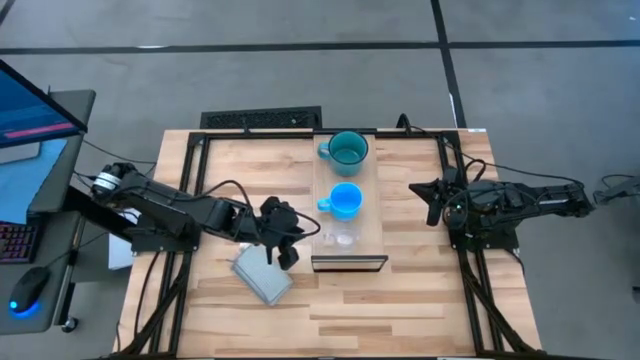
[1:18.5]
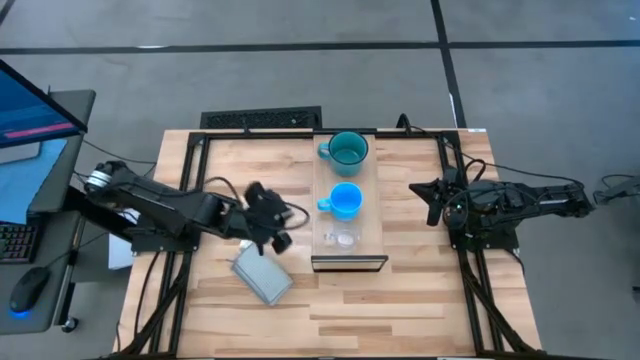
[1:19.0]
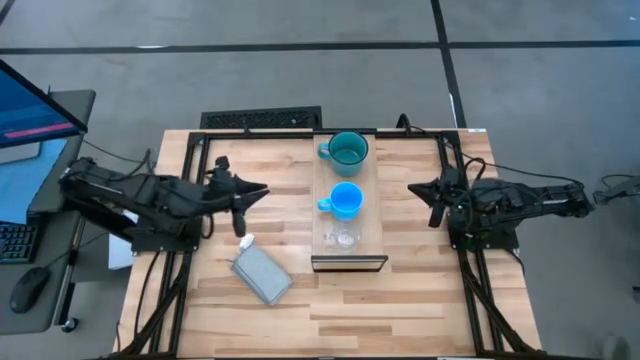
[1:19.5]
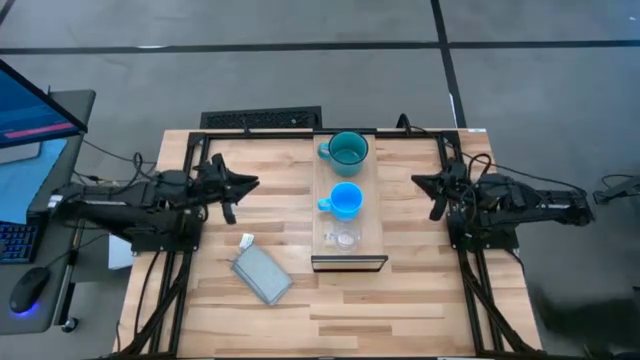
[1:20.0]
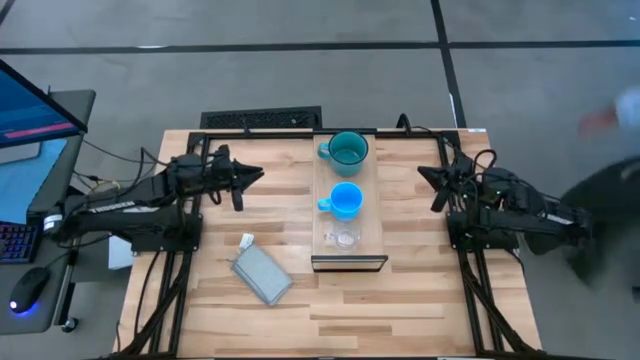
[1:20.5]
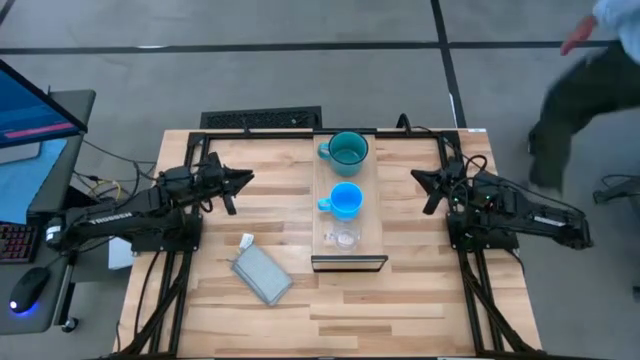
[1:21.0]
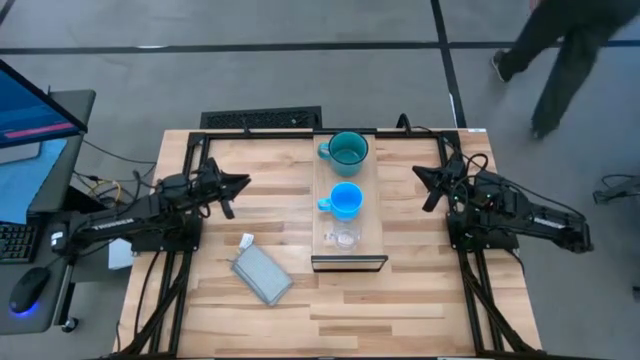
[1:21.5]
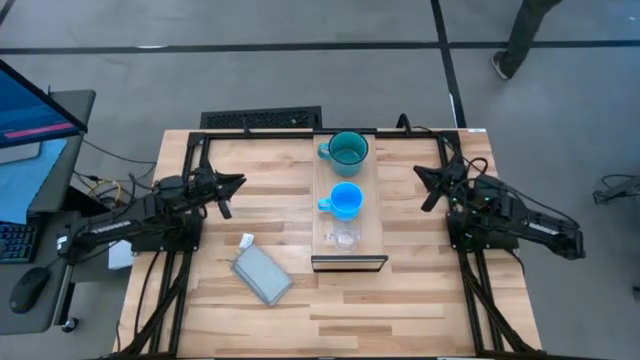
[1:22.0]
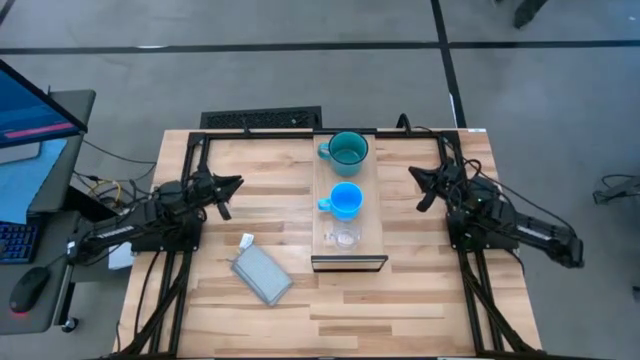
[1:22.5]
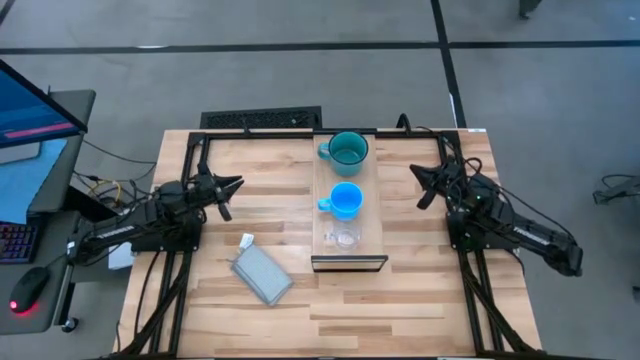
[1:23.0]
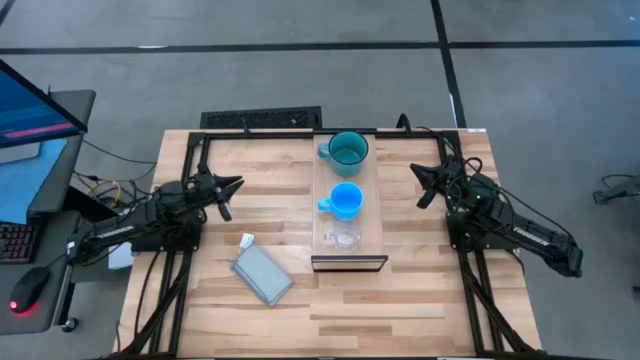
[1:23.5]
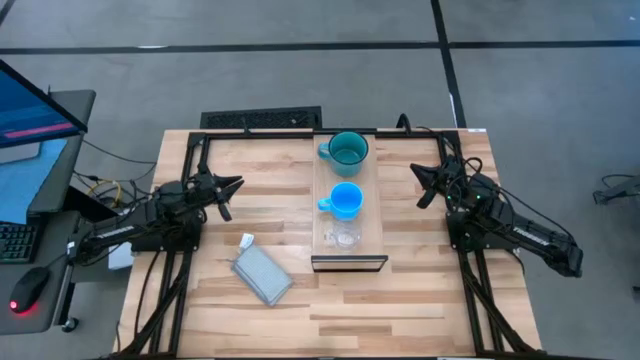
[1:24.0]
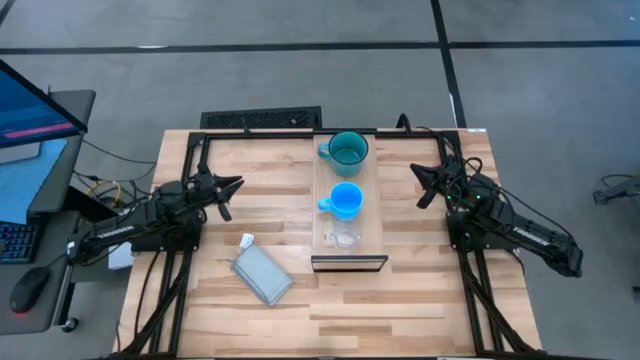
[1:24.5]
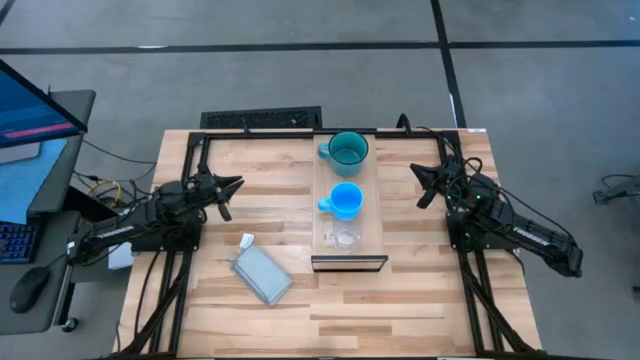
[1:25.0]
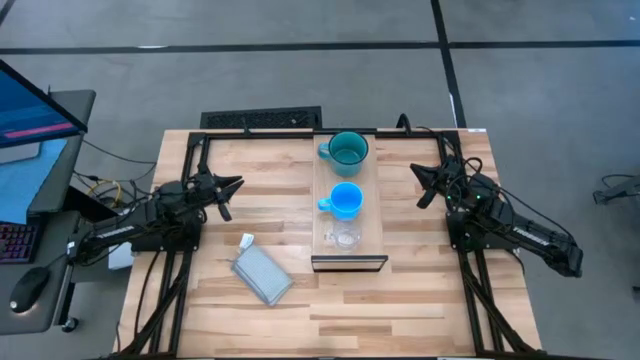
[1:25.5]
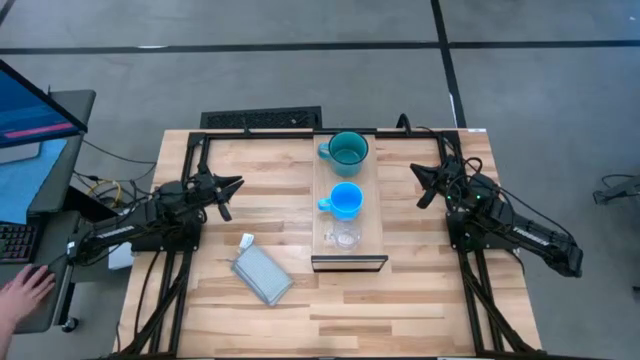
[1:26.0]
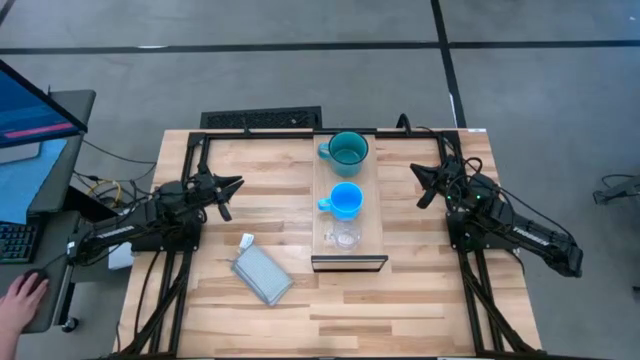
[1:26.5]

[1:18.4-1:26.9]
Task: Stack small to large cups/mugs on shelf
Return to Home Position

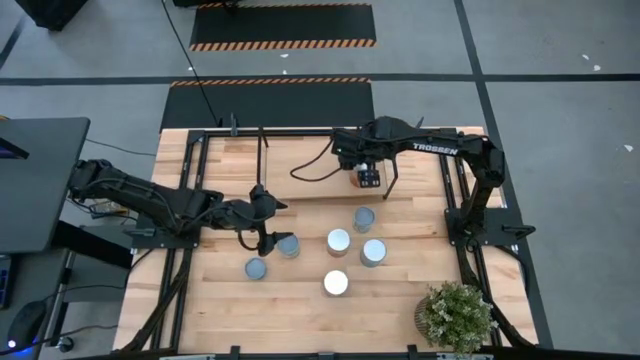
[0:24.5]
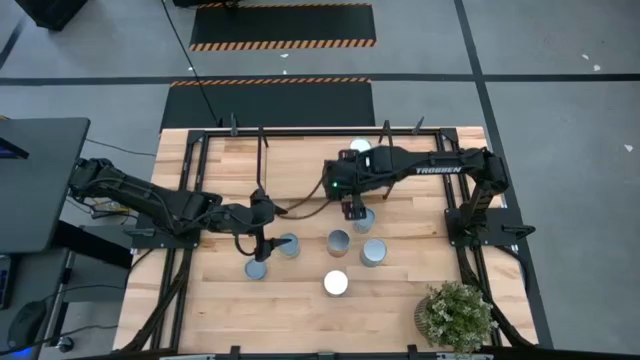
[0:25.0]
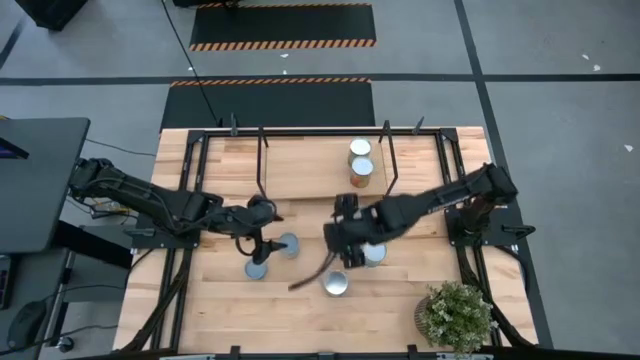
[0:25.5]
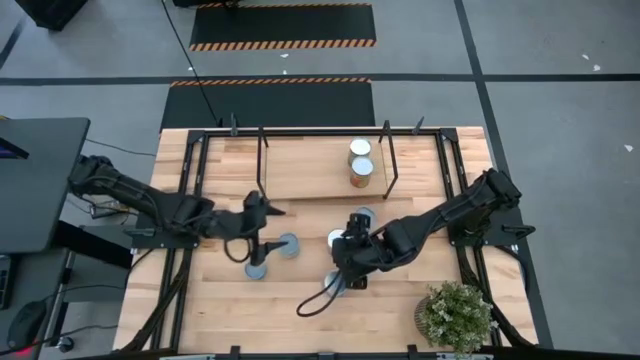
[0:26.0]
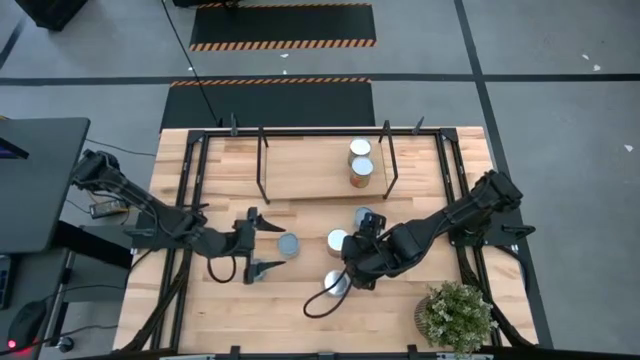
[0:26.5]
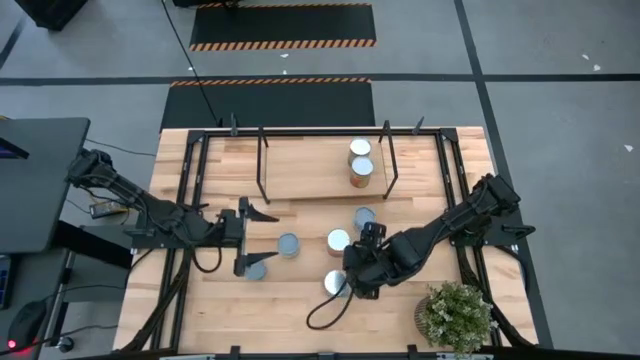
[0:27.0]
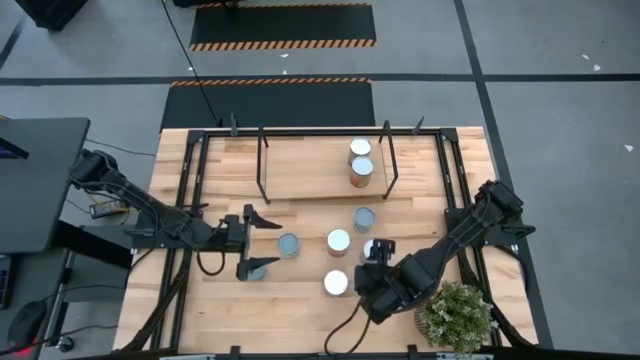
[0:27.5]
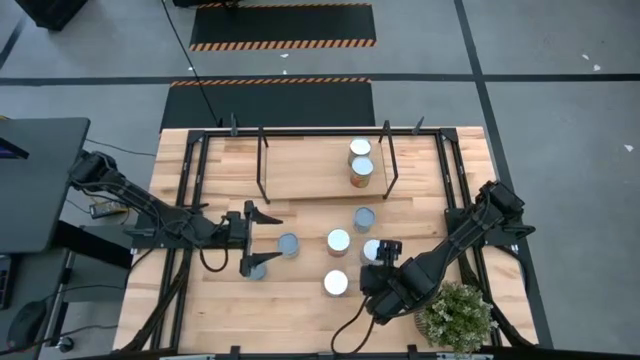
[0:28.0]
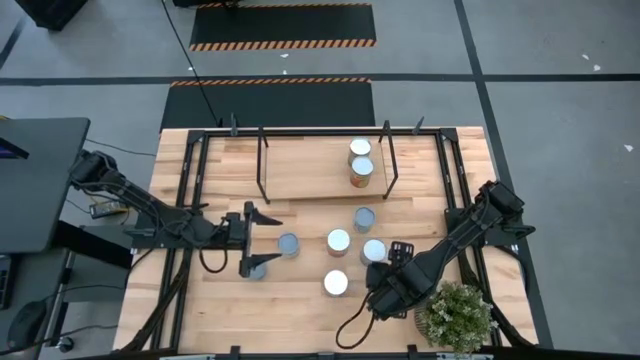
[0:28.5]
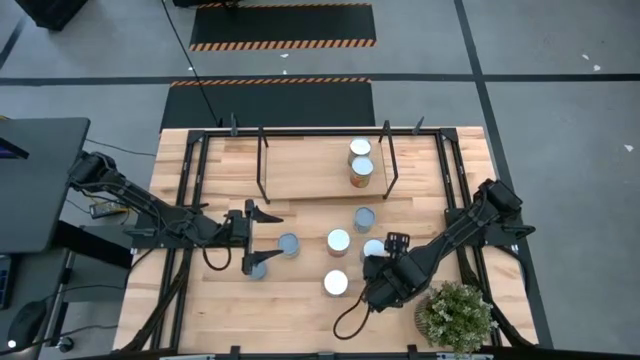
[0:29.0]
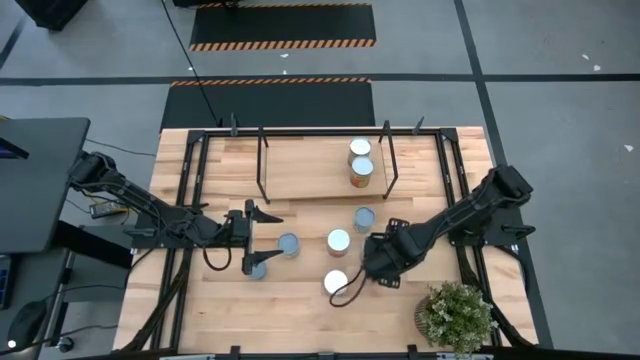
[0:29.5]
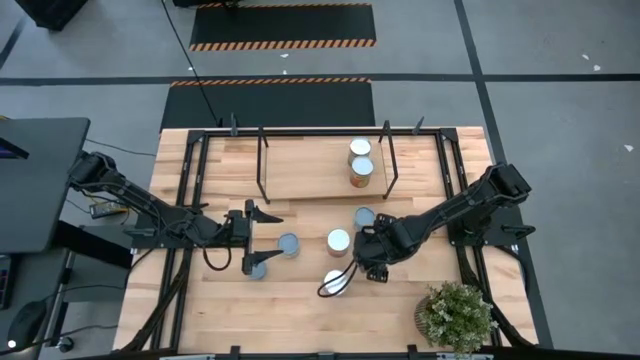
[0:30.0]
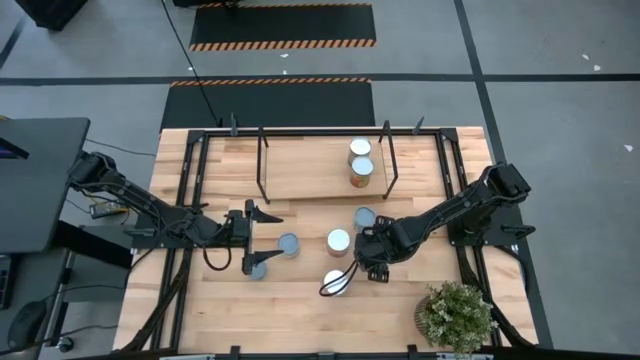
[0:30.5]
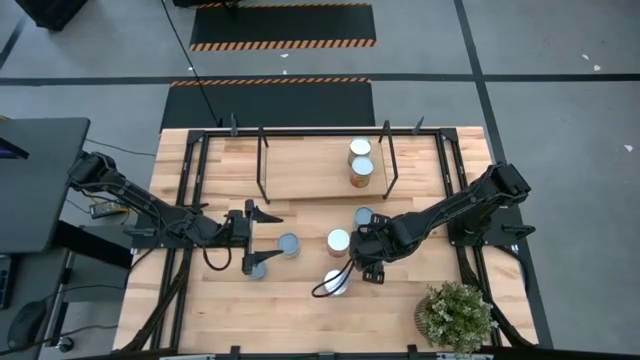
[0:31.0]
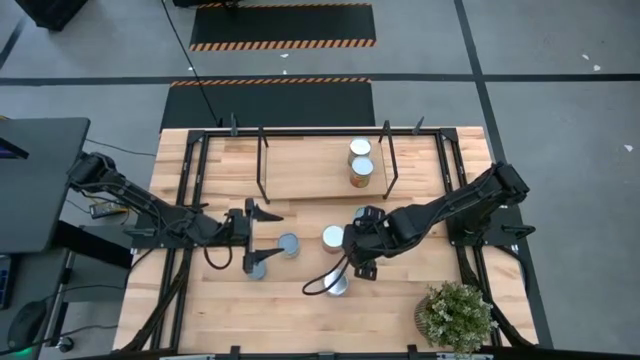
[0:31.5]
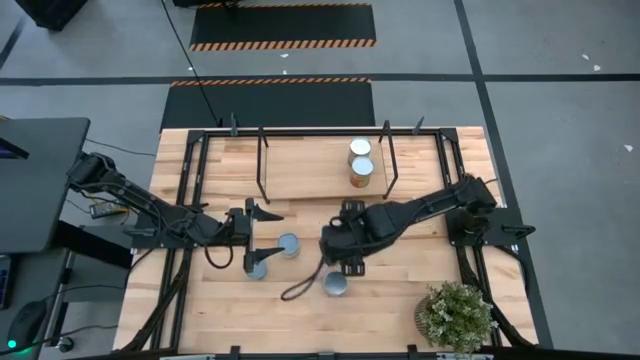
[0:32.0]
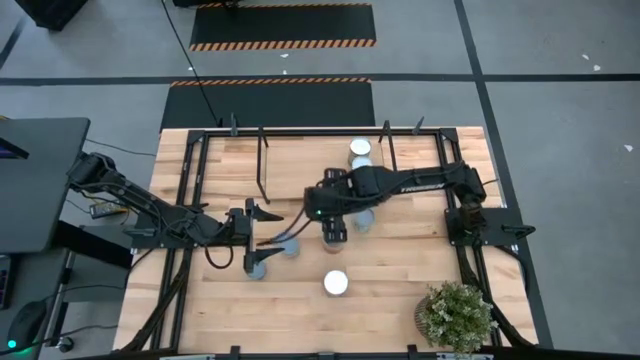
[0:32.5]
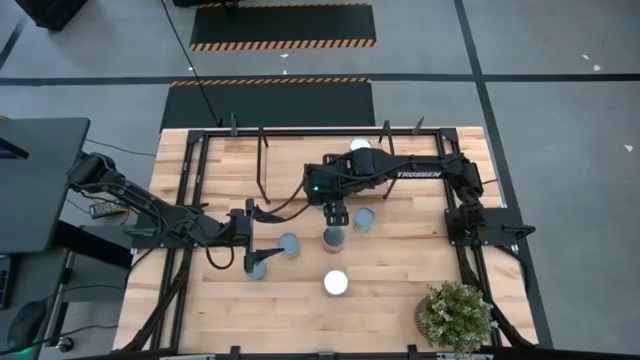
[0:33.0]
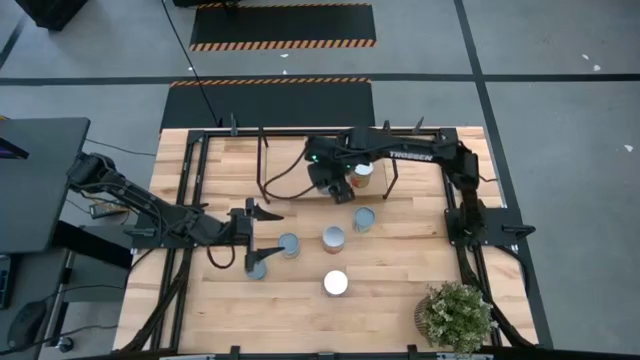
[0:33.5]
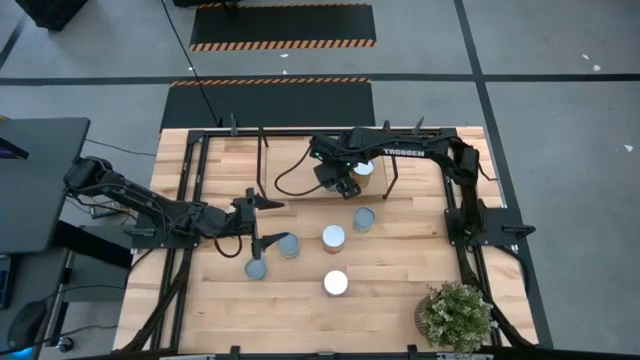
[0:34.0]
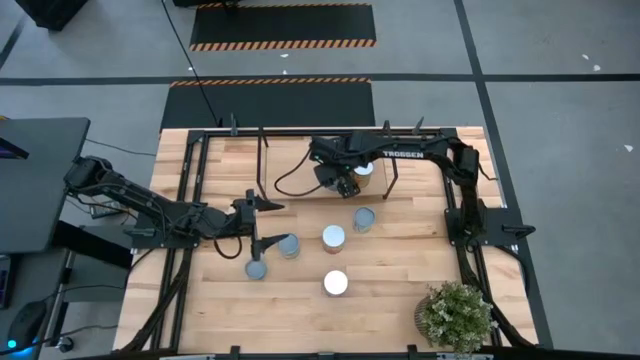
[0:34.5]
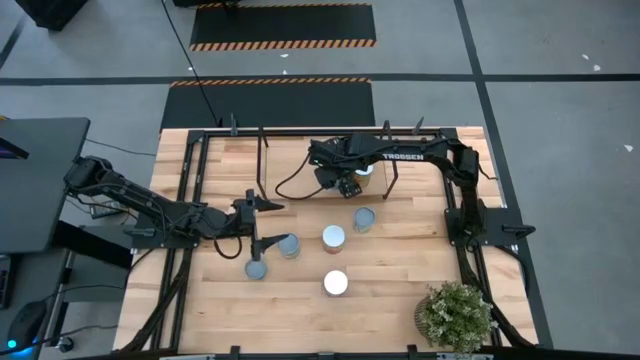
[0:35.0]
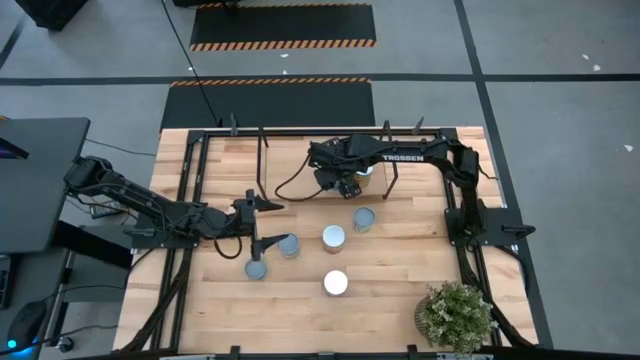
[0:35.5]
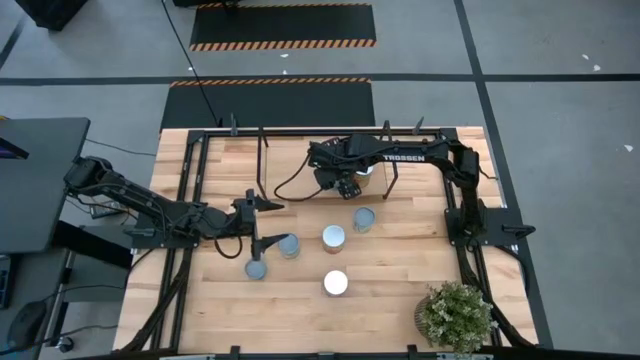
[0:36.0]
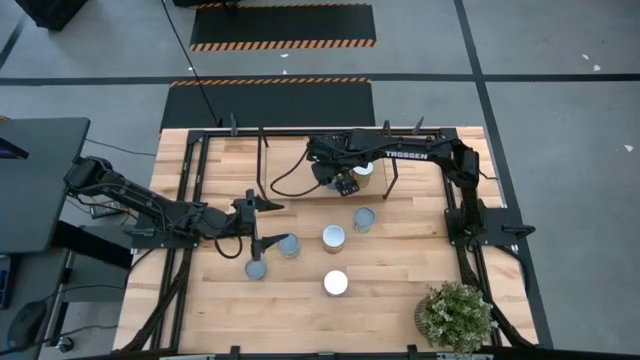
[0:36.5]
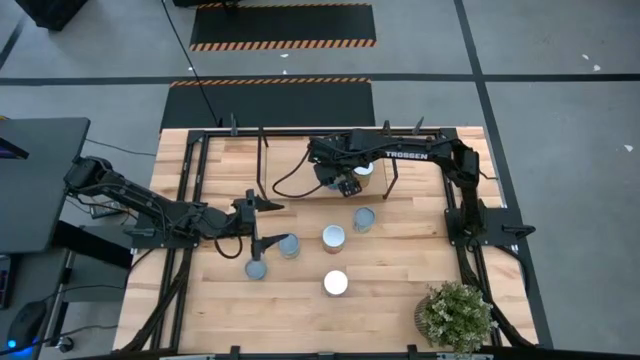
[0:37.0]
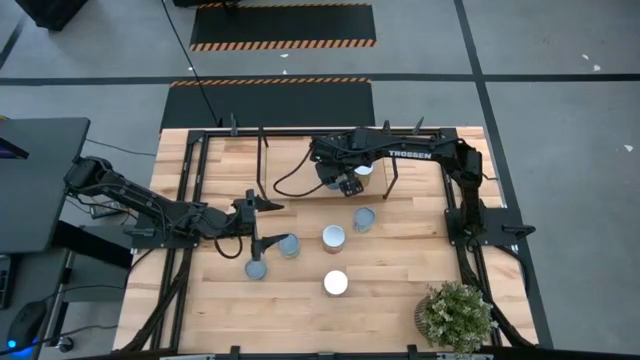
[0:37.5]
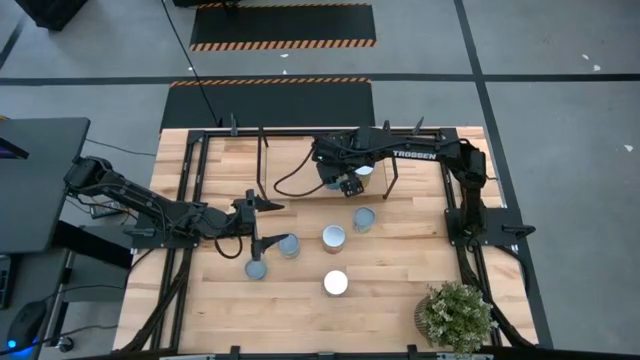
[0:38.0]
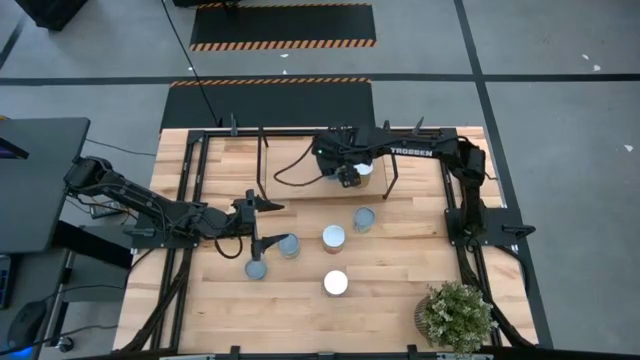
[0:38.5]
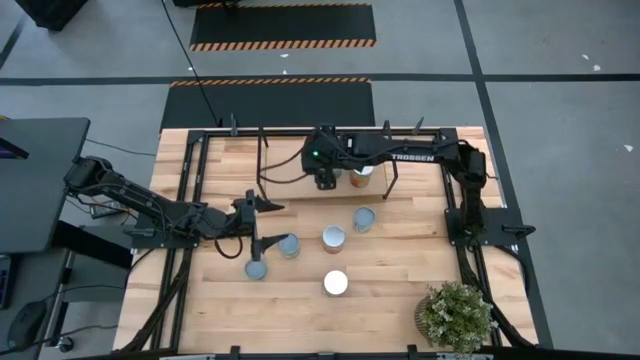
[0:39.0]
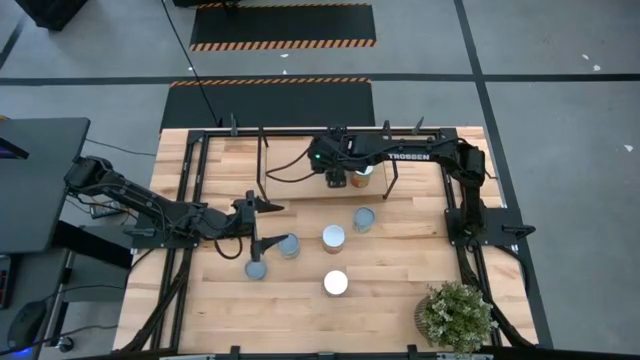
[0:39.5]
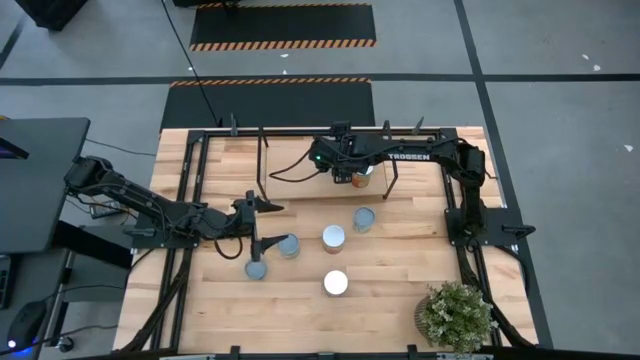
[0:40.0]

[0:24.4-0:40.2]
Task: Pick and place cans onto a shelf
Put the canned cherries on the shelf
